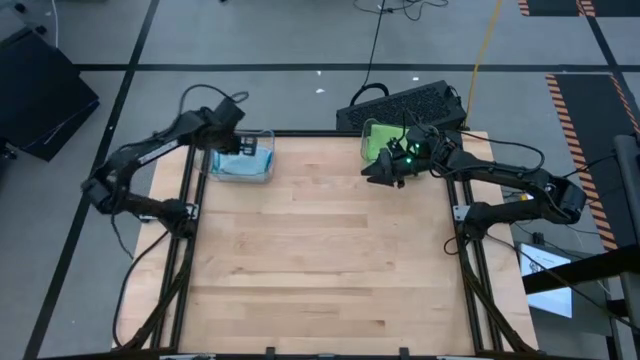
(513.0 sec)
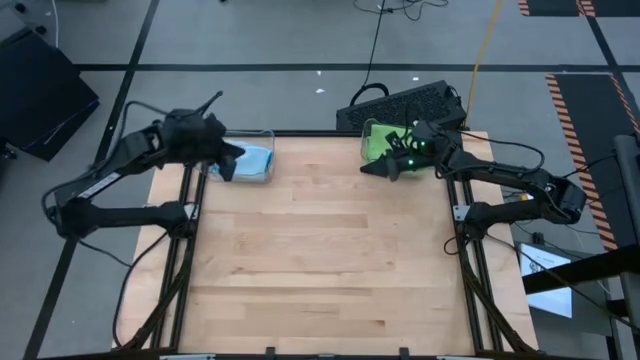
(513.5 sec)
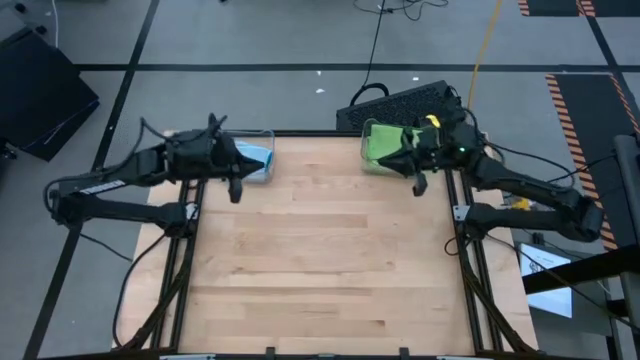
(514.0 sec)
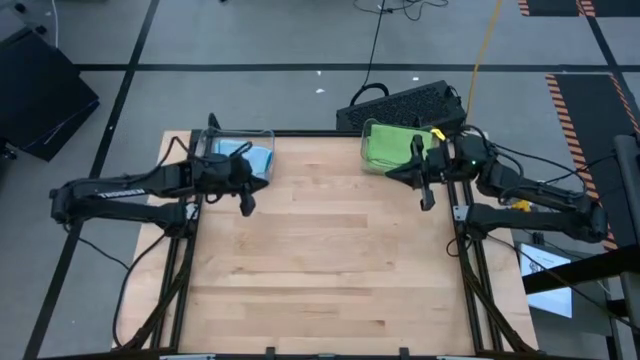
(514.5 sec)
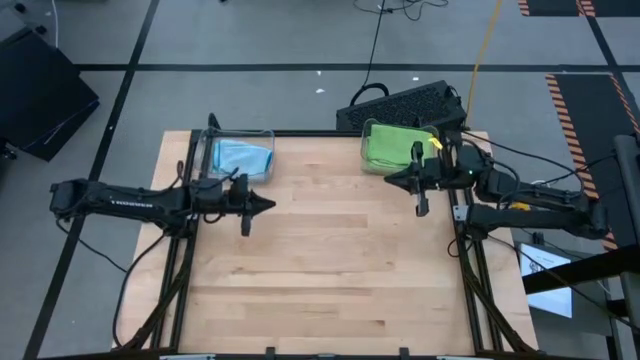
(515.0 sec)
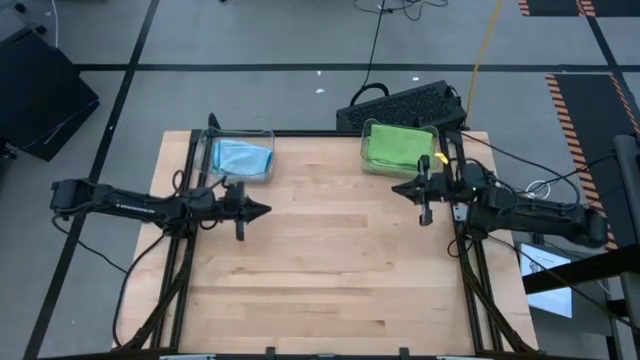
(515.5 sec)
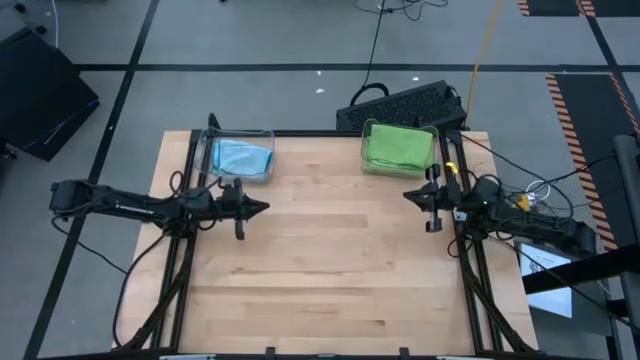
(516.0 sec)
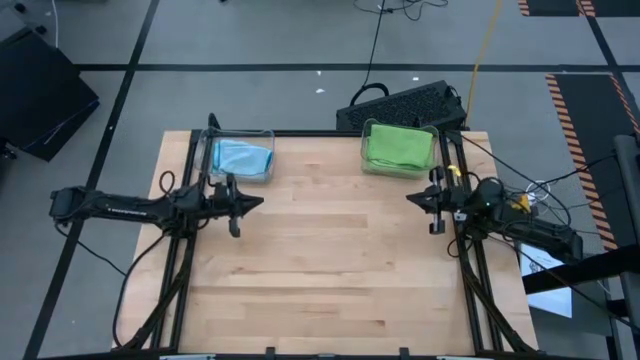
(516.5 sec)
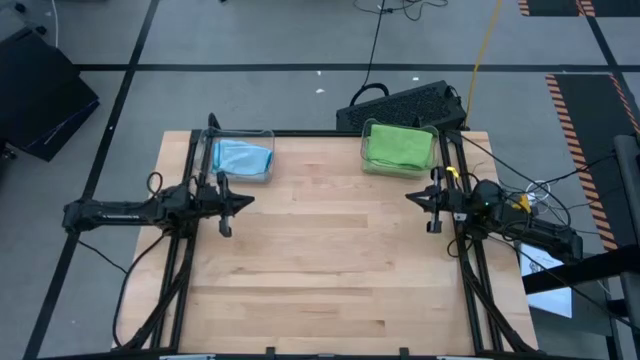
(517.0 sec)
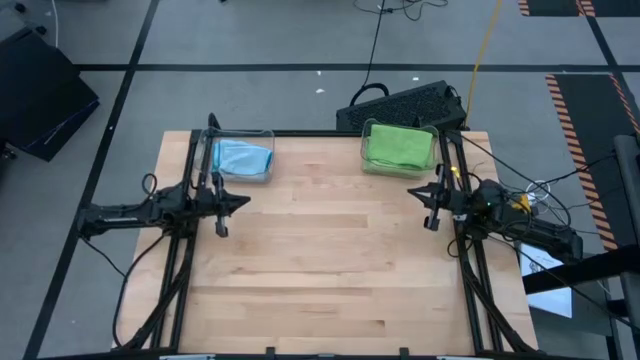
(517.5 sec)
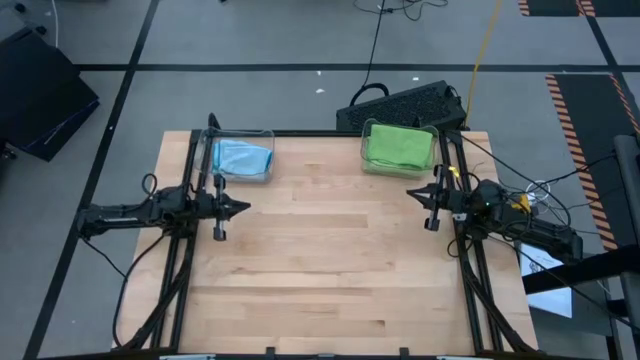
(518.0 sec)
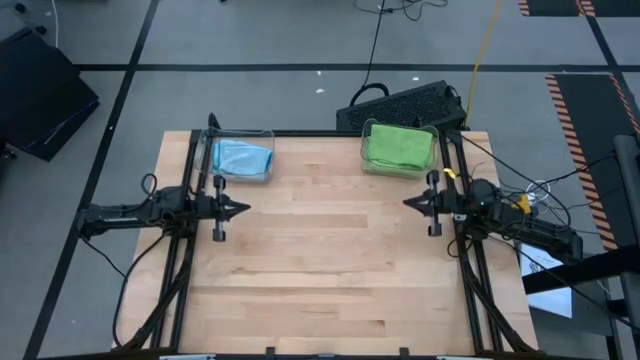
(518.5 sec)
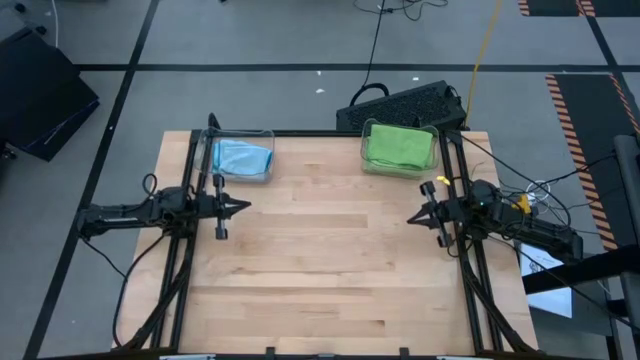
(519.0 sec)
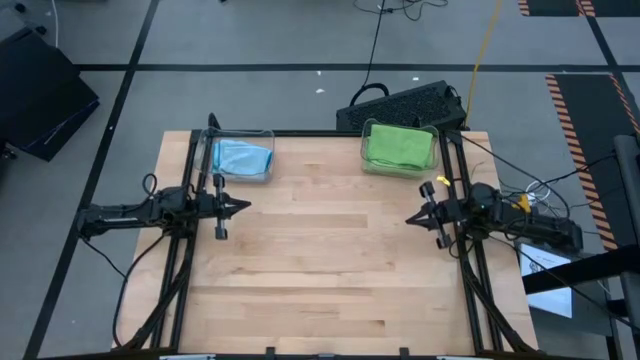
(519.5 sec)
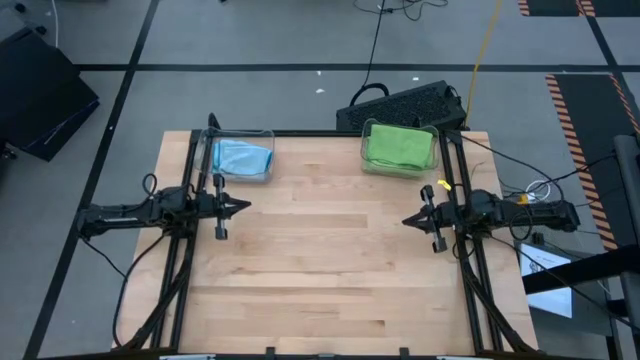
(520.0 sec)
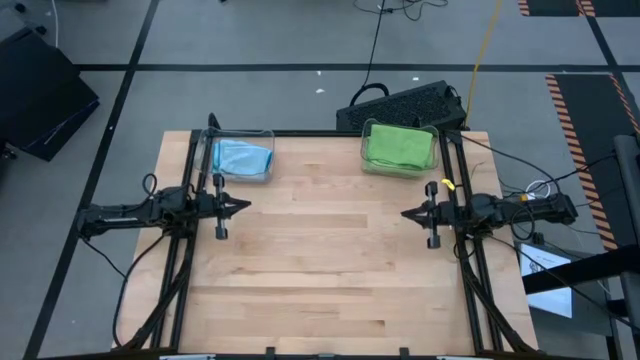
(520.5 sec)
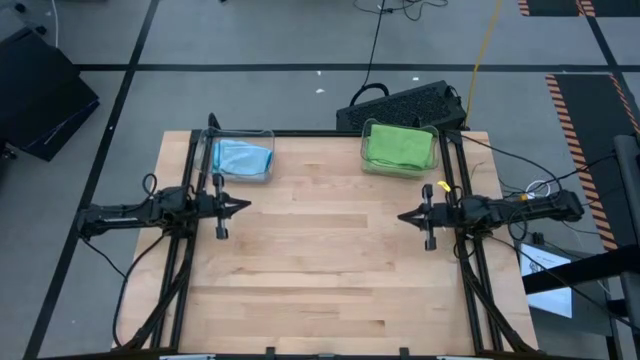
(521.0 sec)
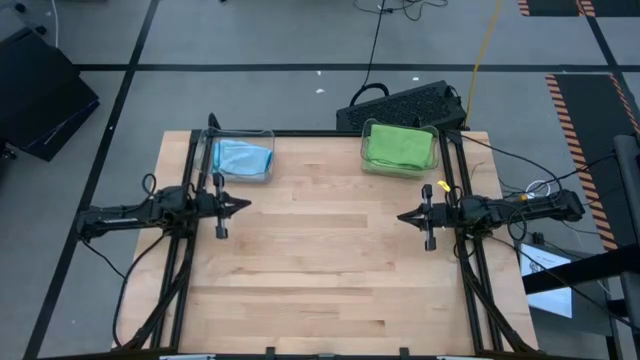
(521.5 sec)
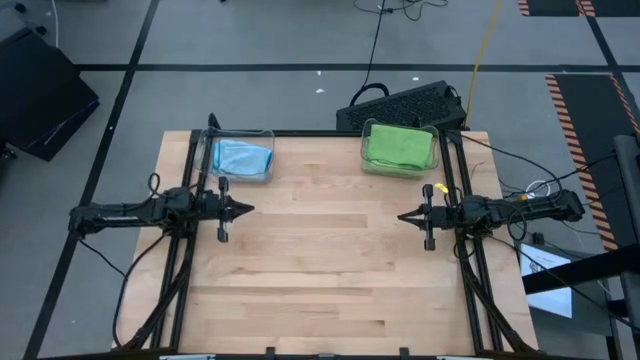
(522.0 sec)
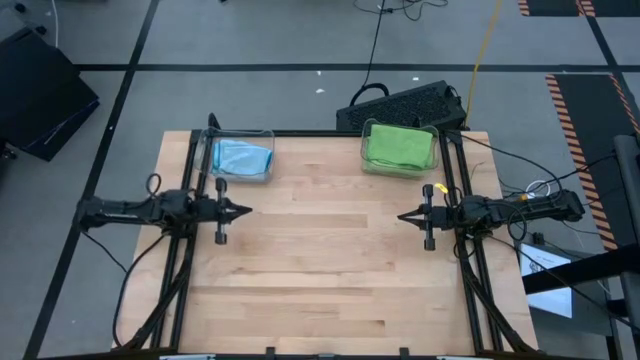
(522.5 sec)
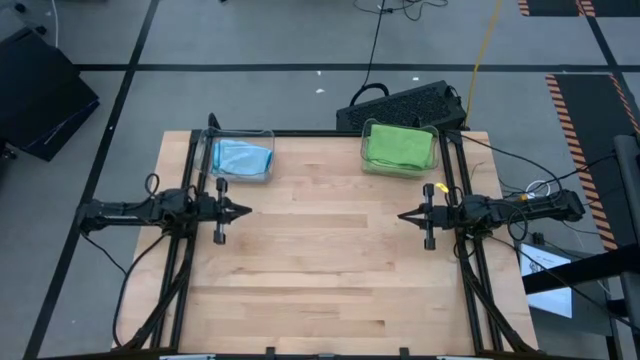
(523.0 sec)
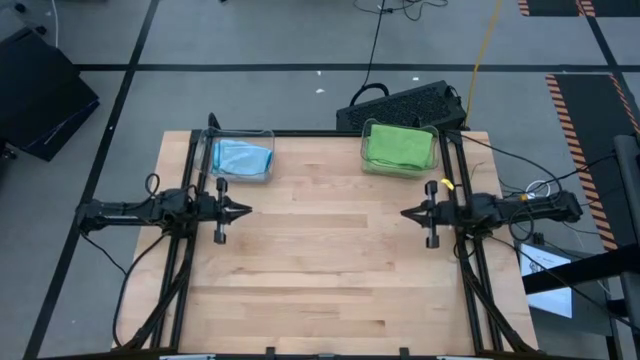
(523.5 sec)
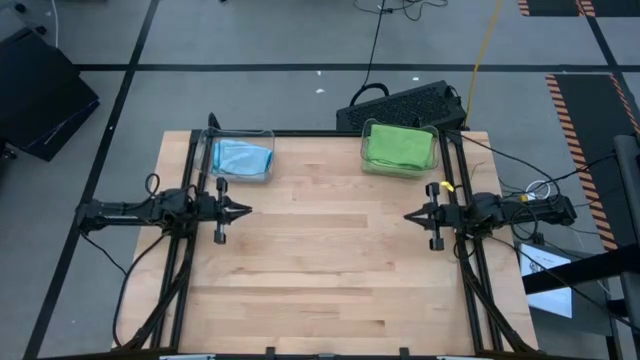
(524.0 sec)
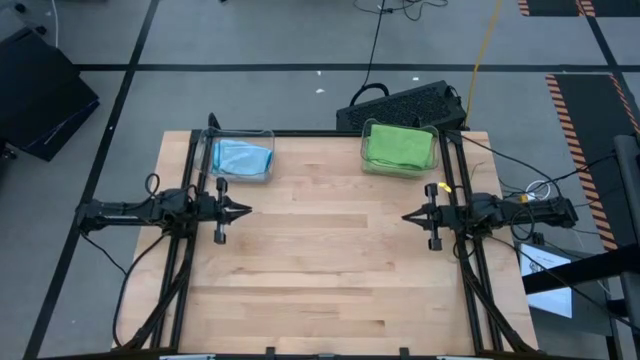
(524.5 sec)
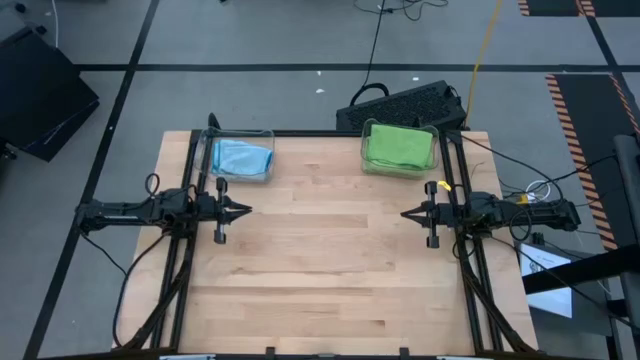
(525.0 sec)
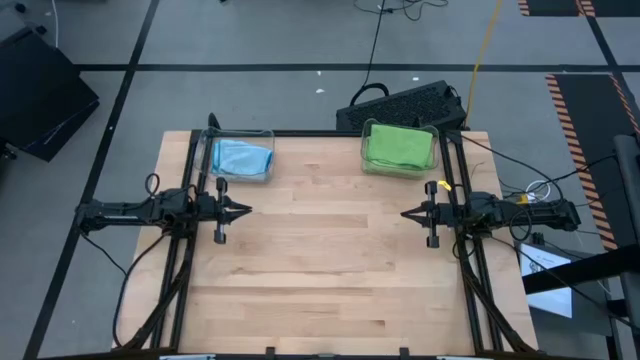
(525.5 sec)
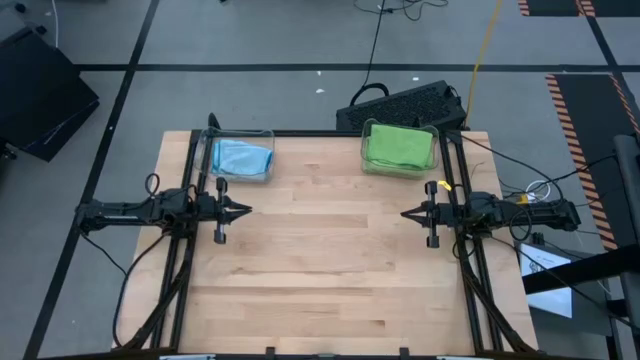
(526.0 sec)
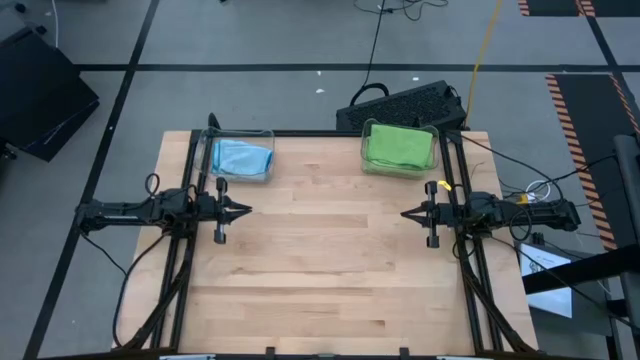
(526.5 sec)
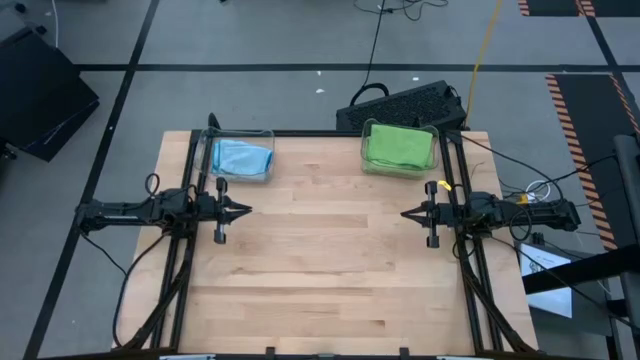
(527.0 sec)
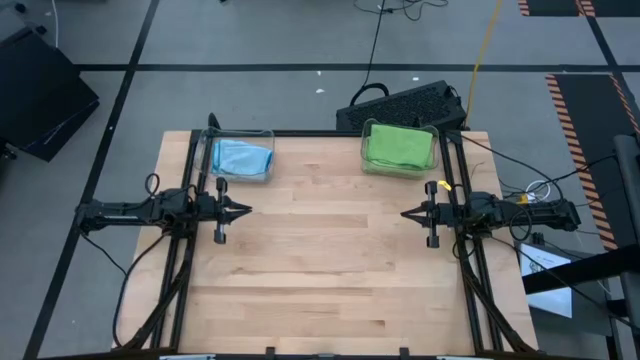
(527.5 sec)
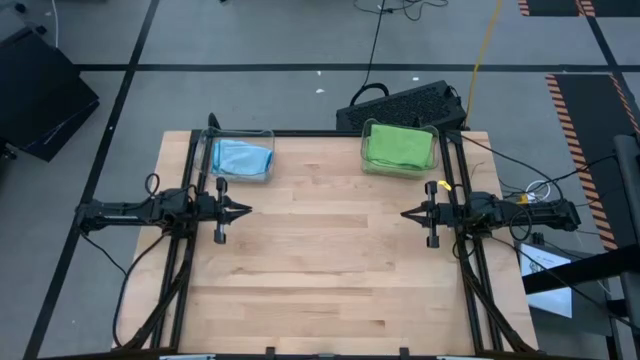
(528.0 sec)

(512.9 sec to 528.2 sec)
Task: Sort microfiber towel by color & place in baskets
Return to Home Position

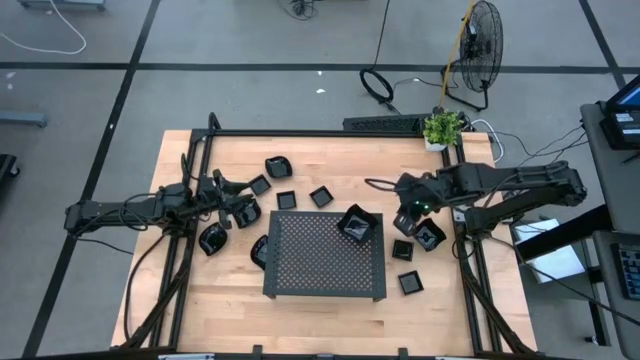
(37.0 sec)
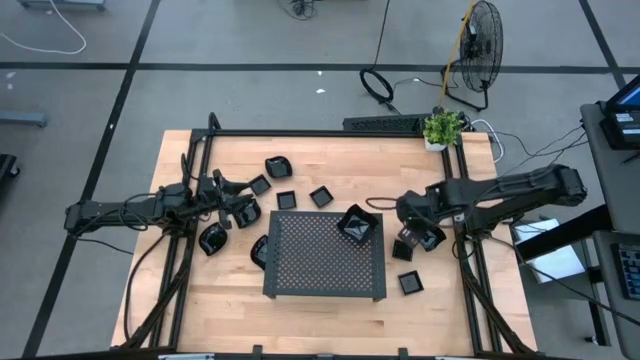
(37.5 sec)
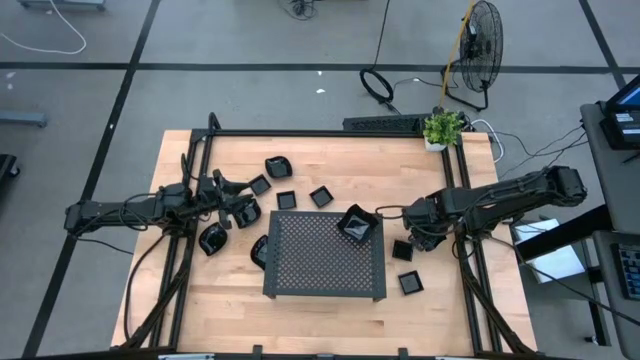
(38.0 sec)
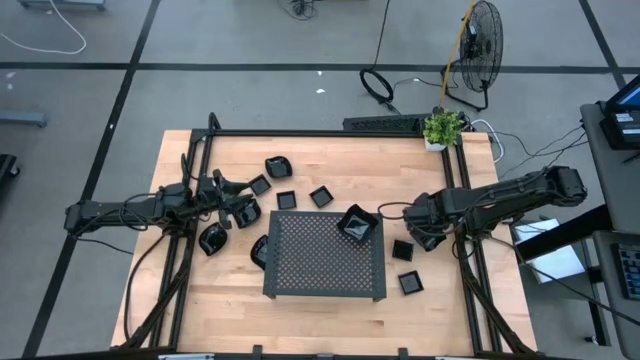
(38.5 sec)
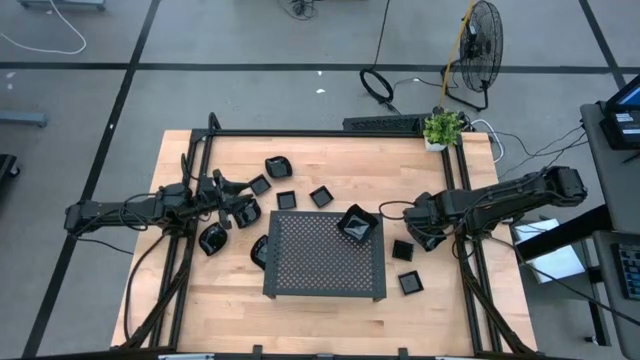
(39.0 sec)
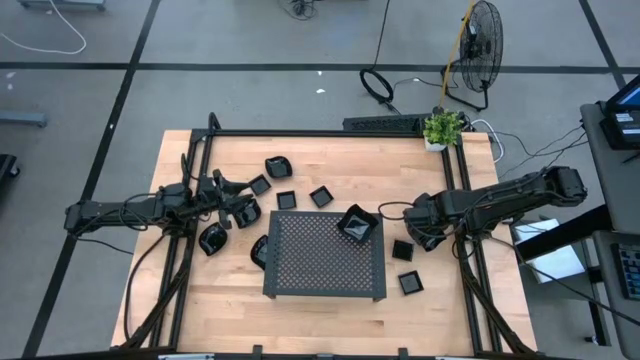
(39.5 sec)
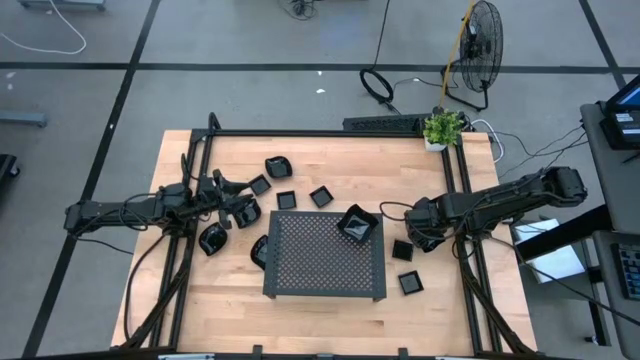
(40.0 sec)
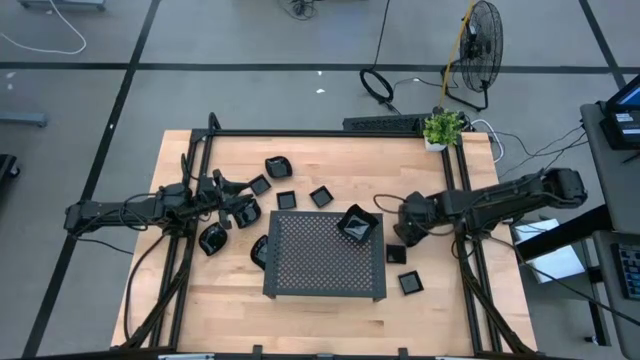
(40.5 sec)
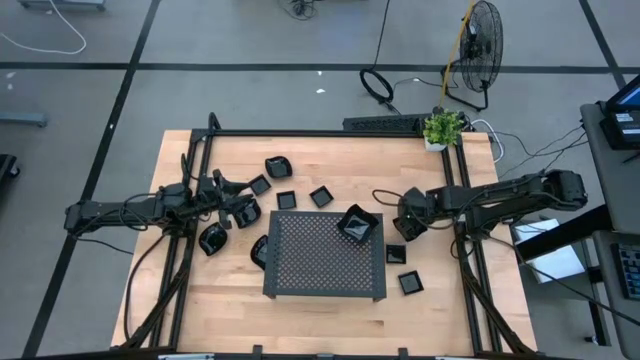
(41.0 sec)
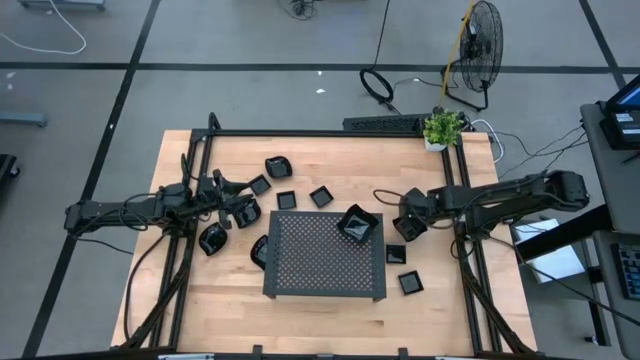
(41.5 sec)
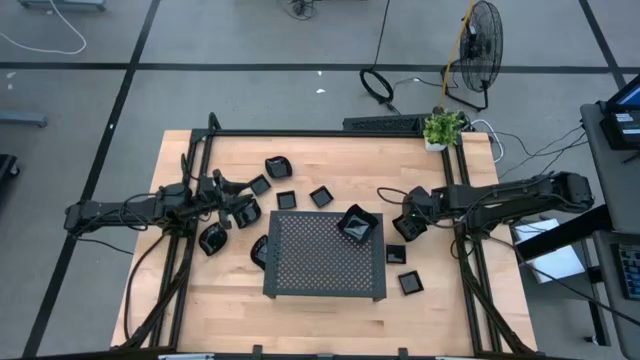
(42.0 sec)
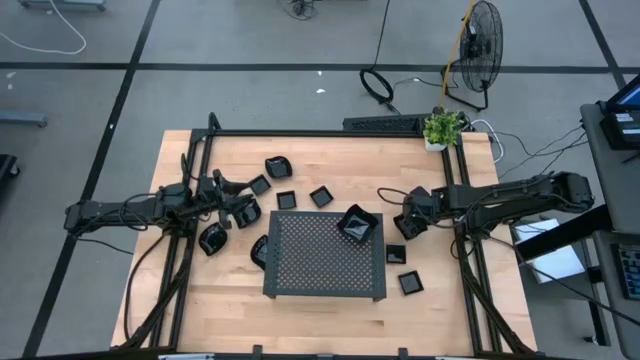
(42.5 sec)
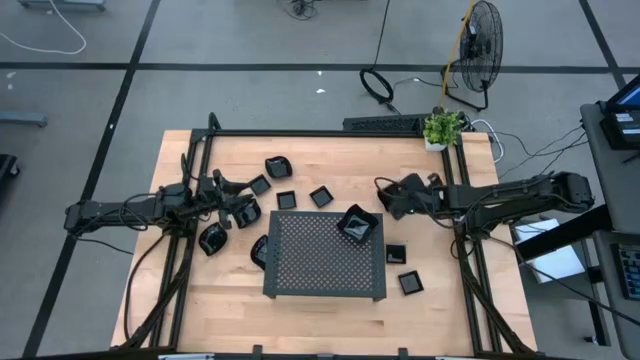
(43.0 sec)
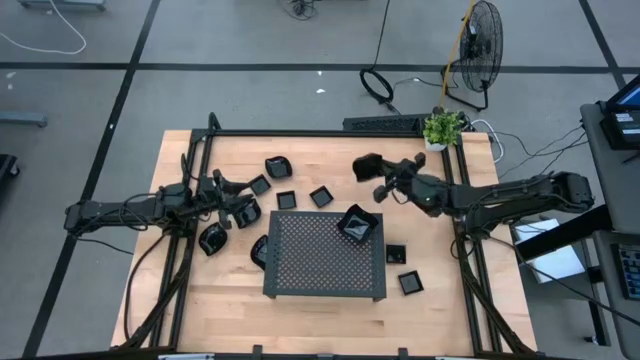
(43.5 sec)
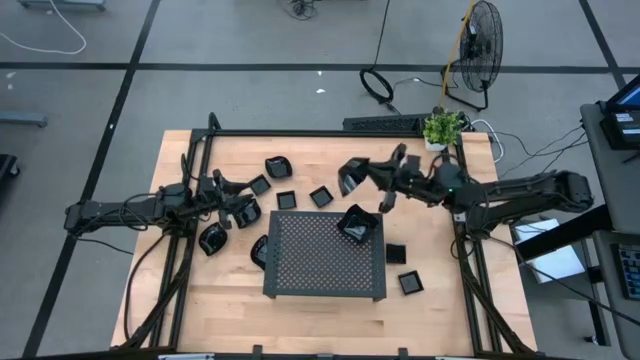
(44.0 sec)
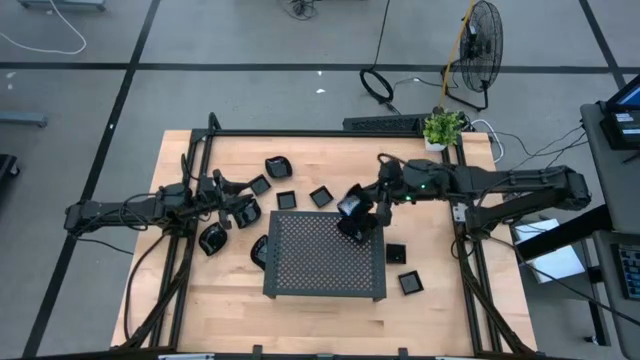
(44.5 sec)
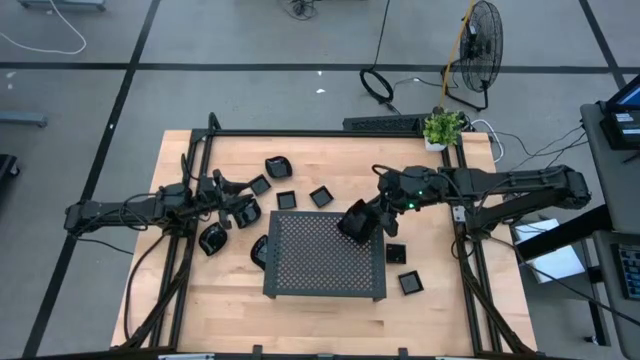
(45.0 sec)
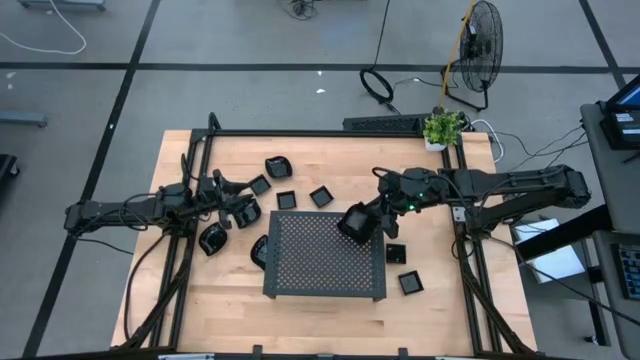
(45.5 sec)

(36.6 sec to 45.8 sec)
Task: Pick & Place Mini shaped plates
Stack the black distorted square plate on top of the black distorted square plates on the shelf
